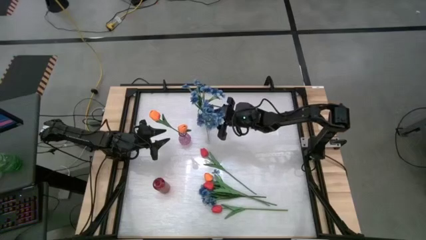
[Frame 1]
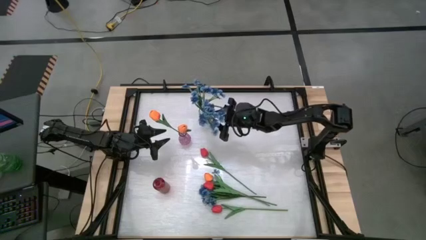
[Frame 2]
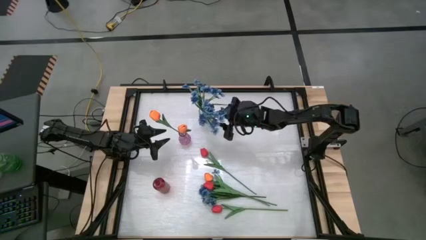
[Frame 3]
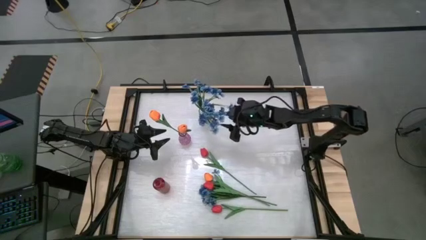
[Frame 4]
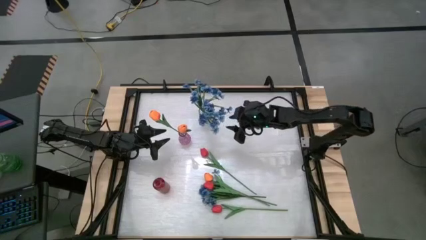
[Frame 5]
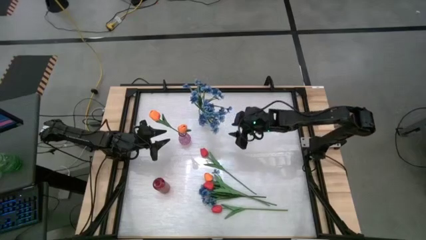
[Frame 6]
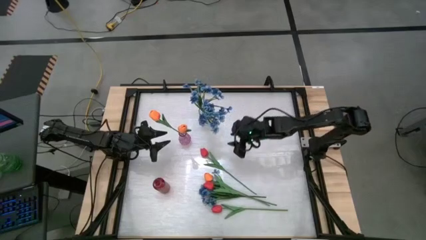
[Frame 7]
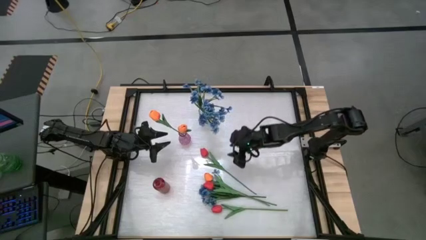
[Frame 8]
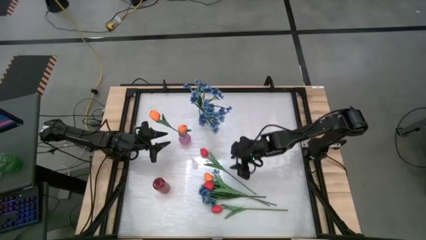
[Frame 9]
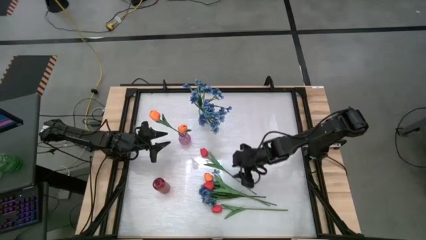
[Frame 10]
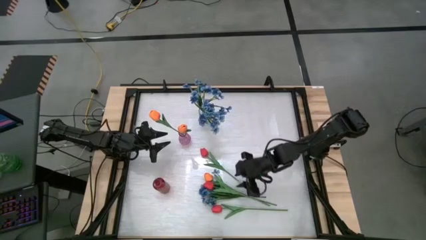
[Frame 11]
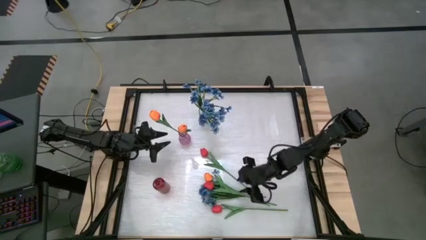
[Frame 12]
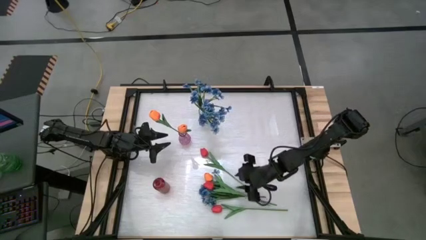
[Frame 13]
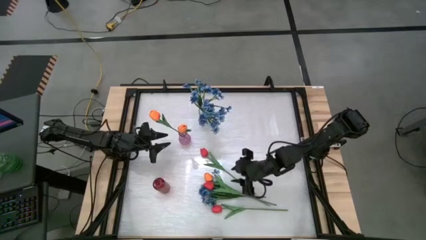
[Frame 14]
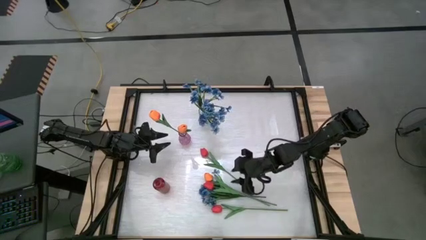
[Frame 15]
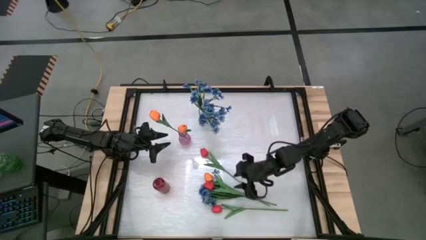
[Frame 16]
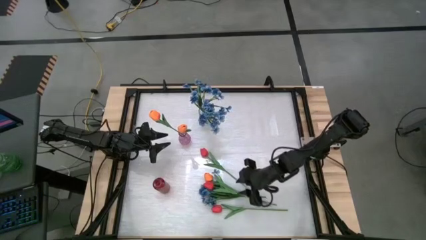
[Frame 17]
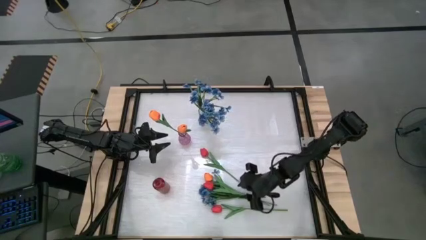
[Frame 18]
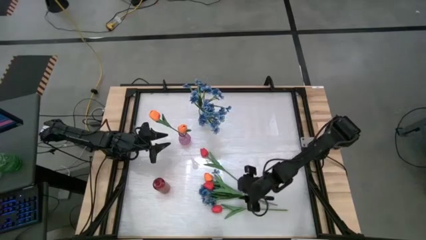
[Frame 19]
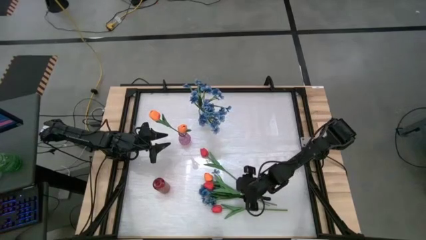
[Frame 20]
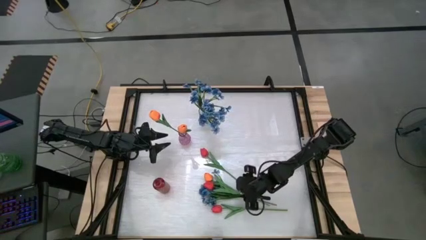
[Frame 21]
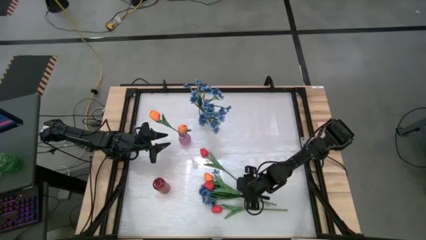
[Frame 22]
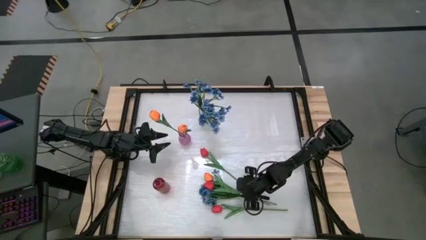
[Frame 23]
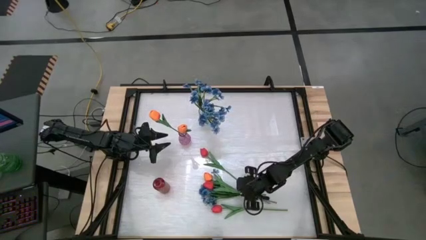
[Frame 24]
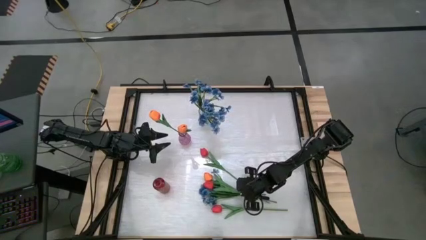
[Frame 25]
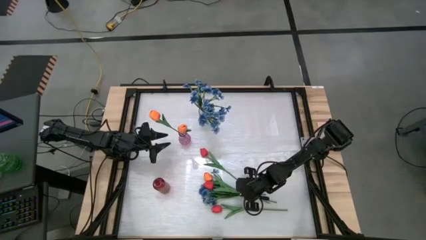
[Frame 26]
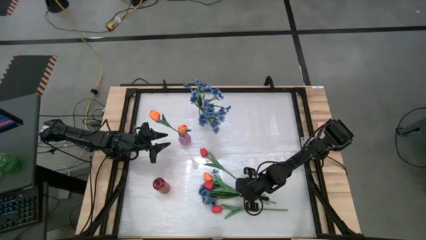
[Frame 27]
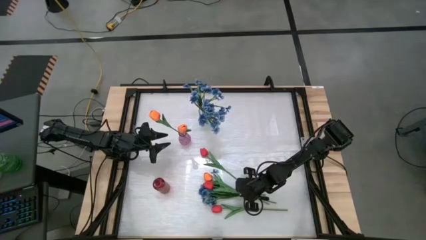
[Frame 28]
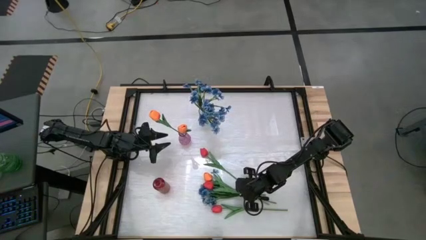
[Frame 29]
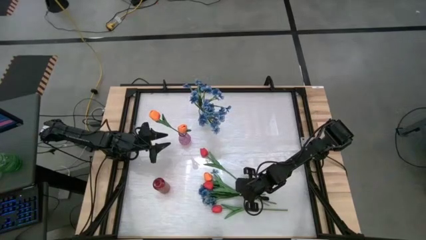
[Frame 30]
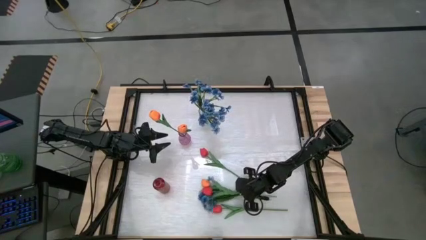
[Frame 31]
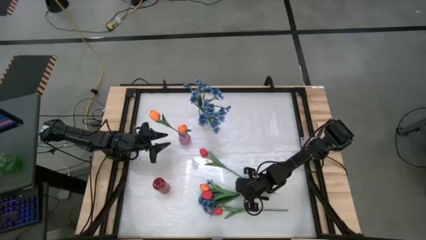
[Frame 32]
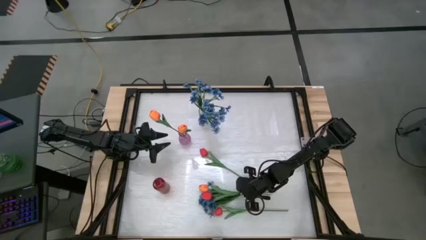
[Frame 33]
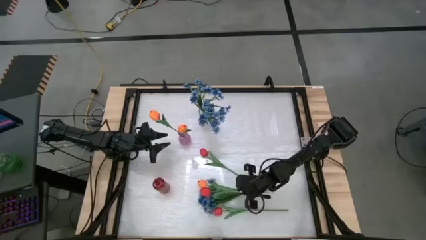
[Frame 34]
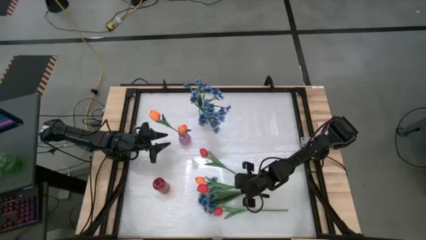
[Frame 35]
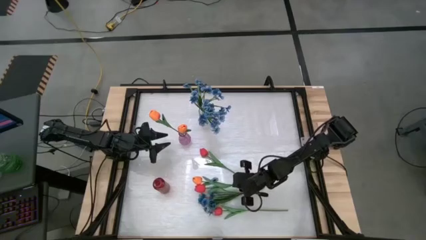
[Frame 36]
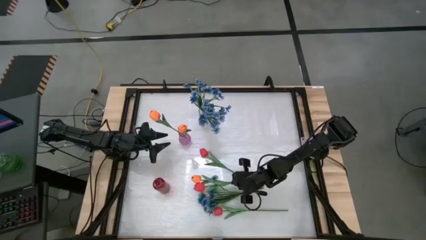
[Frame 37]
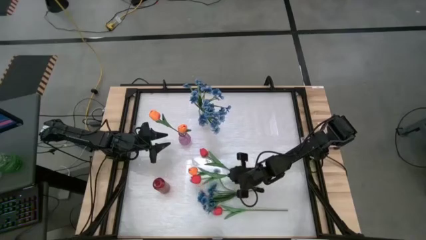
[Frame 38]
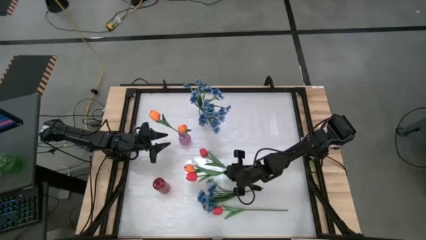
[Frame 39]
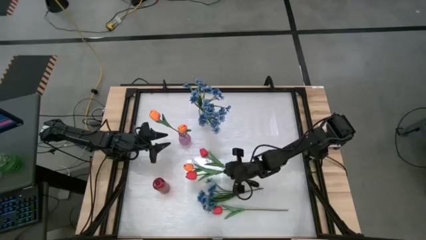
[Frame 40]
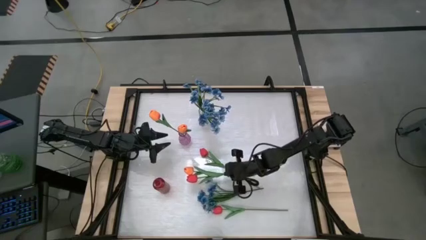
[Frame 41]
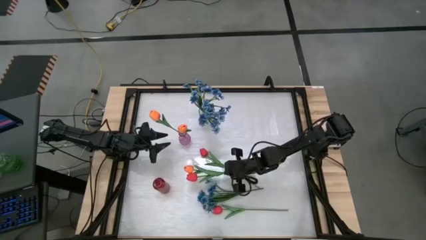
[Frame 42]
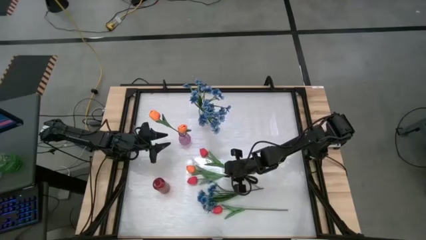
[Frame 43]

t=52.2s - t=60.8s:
Task: Sort flowers into vase by color
Put the center red tulip into the red vase

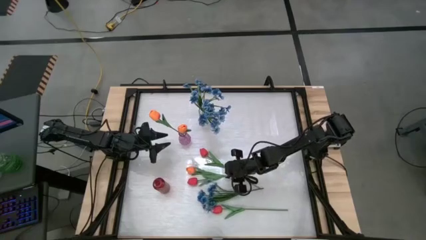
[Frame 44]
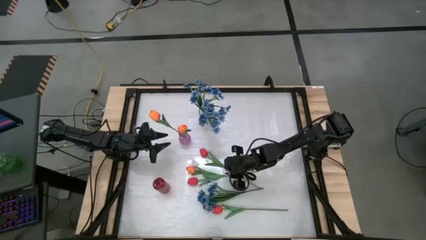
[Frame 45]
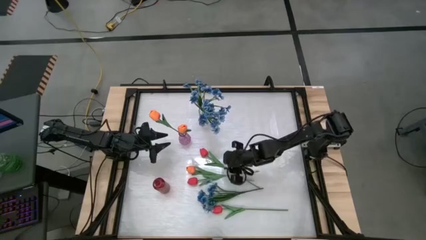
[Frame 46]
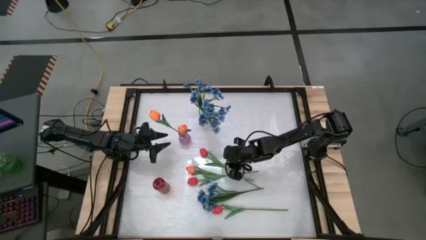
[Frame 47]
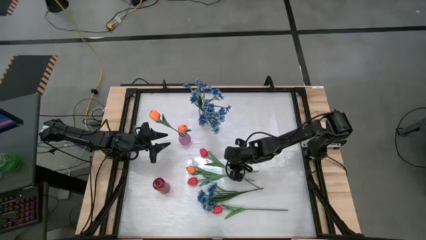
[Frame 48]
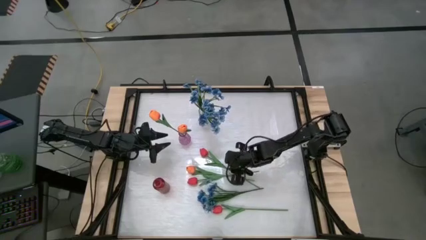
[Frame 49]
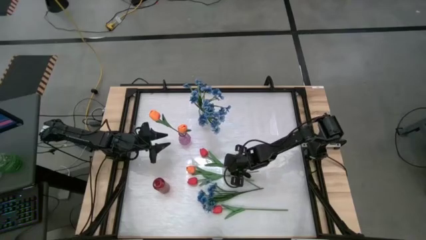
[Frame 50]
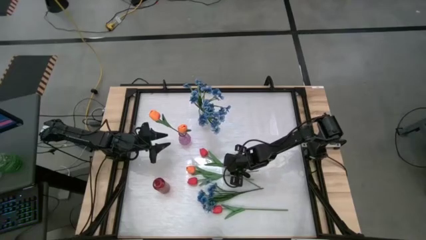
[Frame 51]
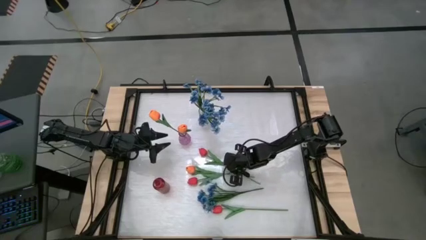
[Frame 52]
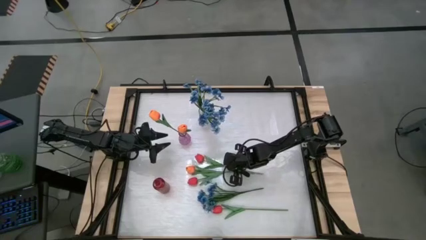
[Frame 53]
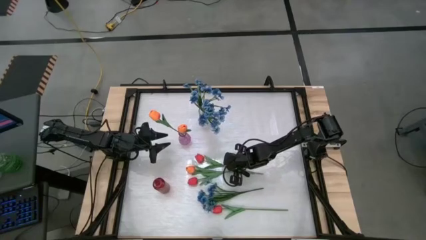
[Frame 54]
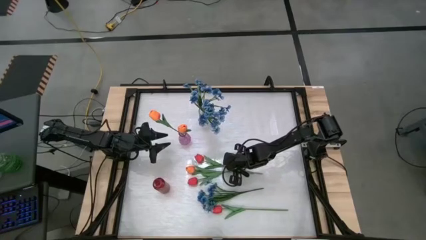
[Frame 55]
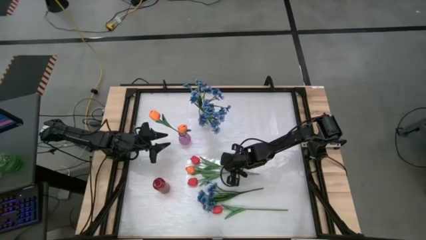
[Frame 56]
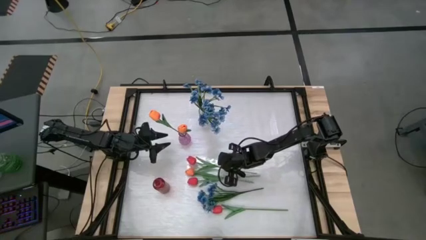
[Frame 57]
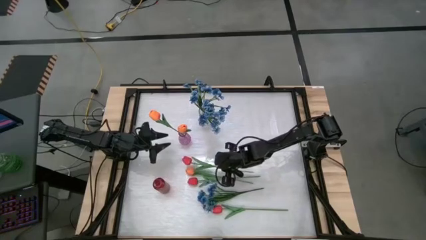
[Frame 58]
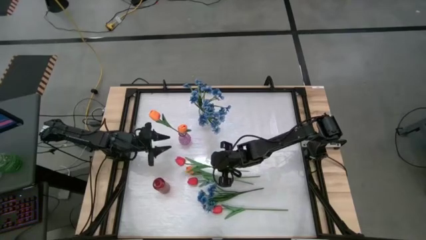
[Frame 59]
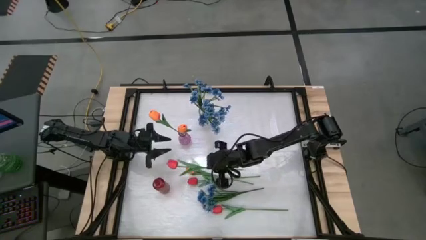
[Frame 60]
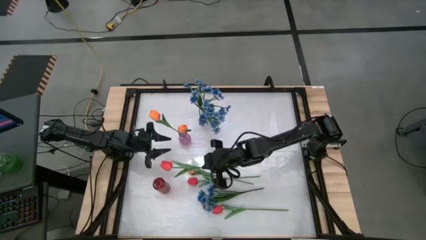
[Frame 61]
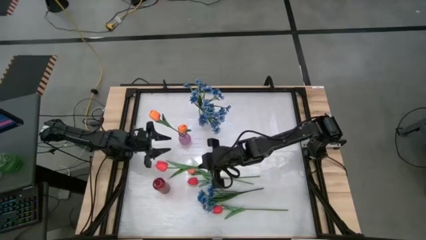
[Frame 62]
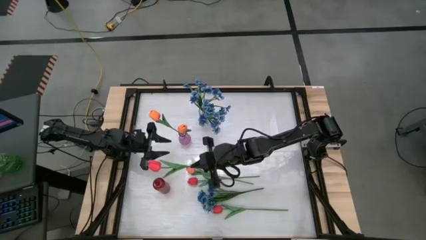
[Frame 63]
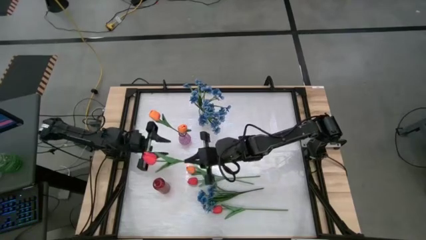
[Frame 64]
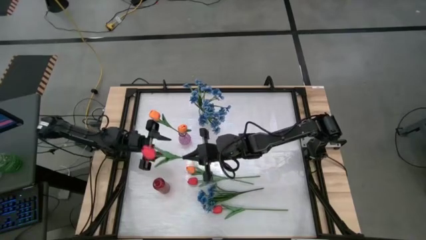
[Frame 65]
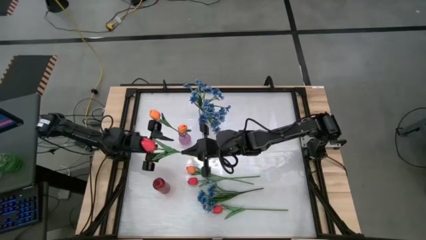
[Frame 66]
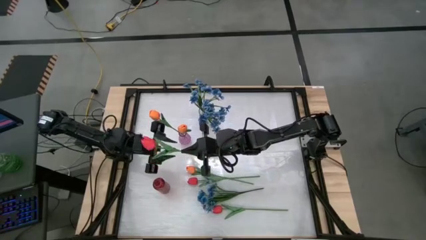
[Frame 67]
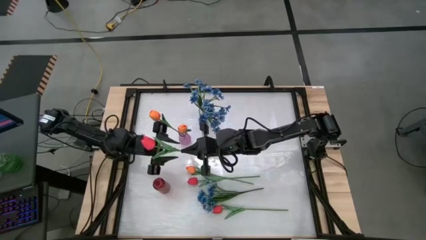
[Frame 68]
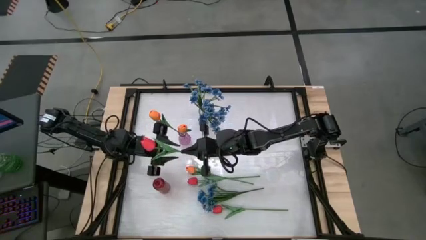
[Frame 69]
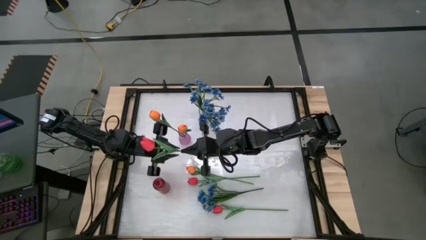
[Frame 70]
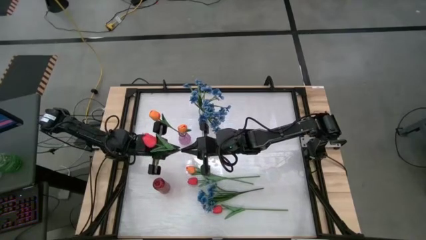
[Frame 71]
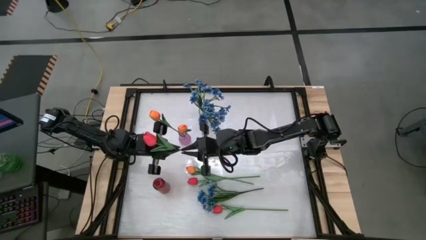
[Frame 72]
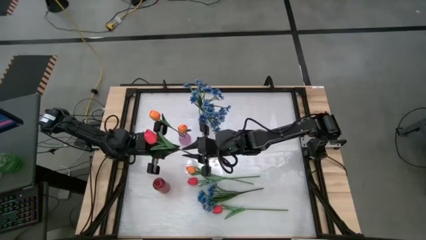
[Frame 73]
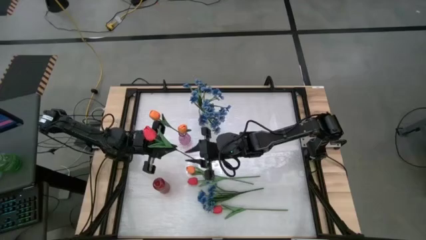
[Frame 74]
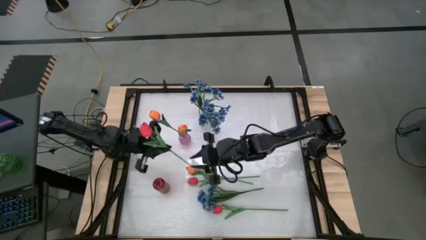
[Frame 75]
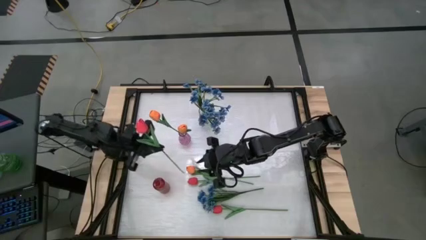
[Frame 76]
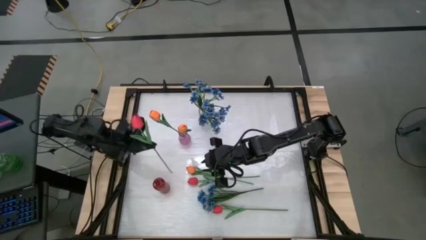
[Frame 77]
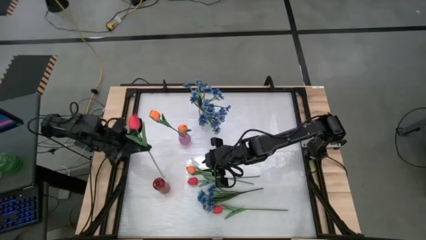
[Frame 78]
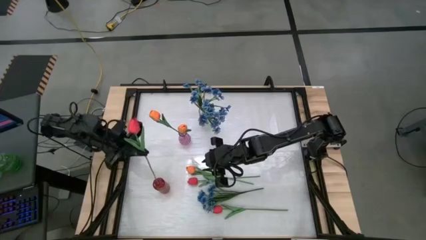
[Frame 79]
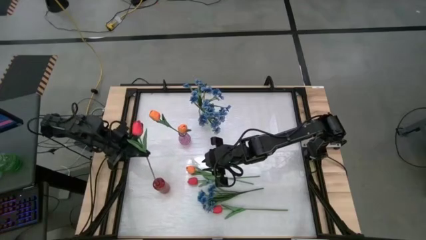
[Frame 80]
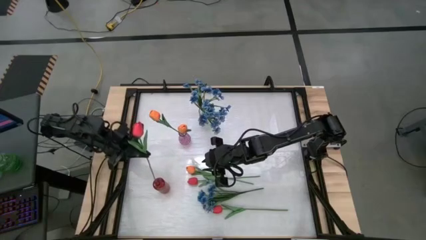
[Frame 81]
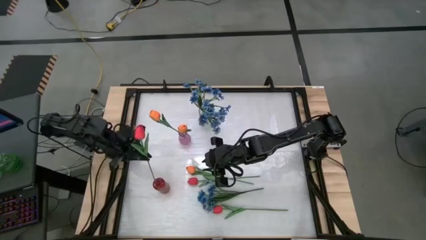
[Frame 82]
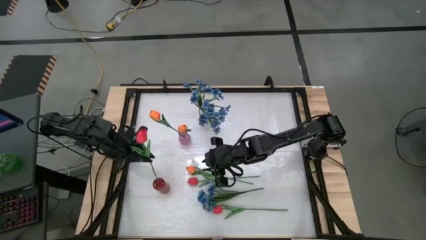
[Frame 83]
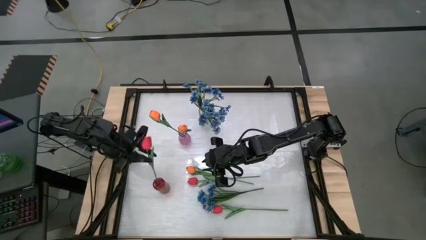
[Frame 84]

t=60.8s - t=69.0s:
Put the top red tulip into the red vase
